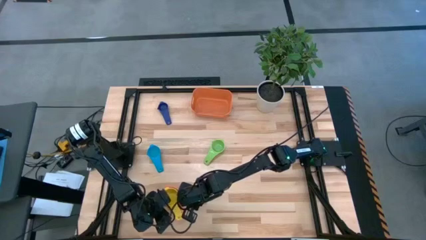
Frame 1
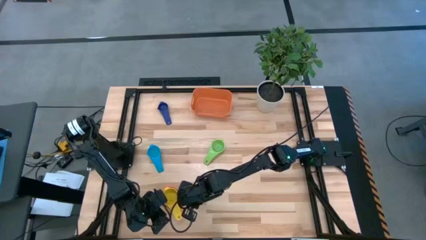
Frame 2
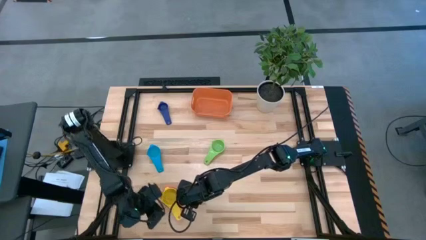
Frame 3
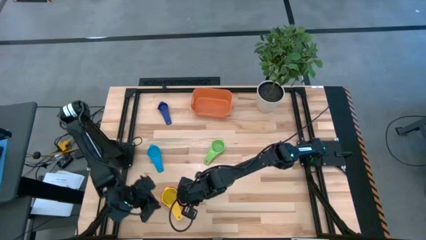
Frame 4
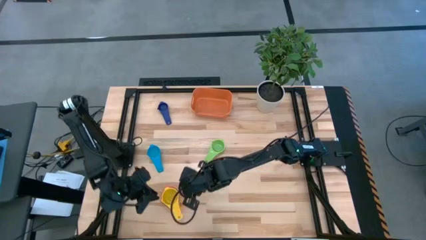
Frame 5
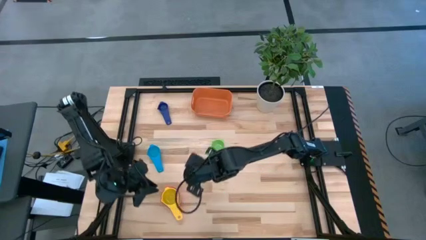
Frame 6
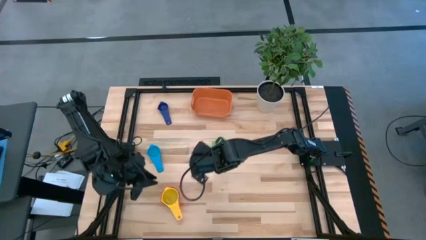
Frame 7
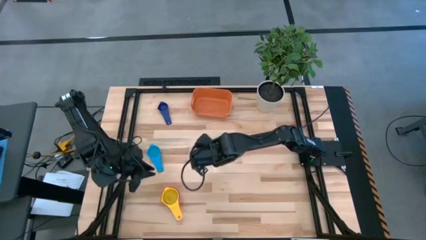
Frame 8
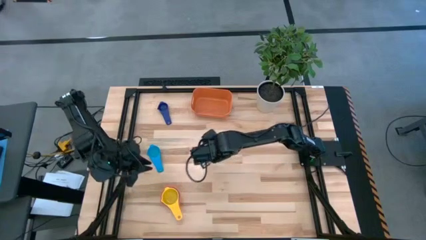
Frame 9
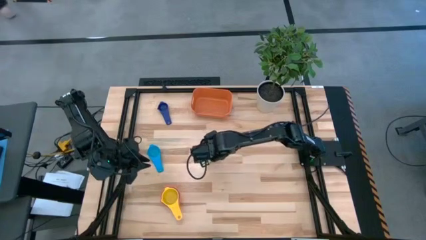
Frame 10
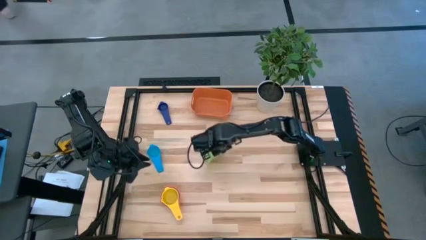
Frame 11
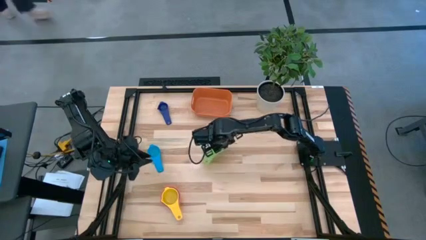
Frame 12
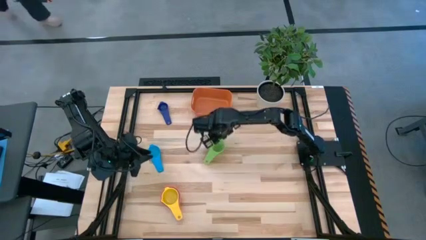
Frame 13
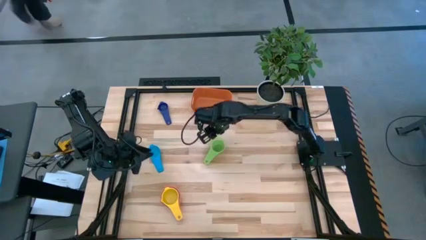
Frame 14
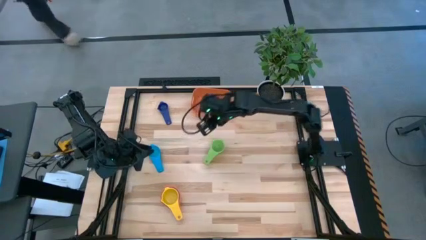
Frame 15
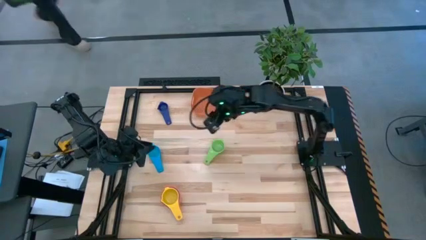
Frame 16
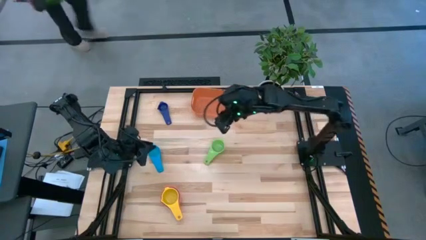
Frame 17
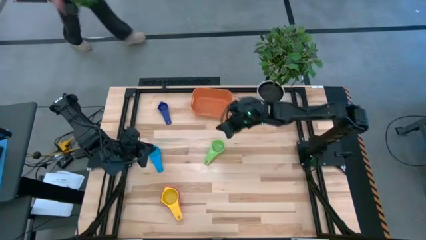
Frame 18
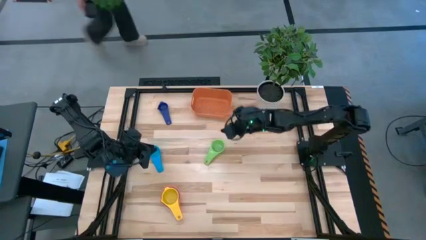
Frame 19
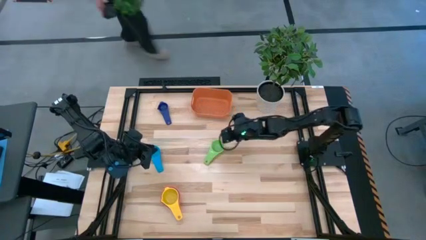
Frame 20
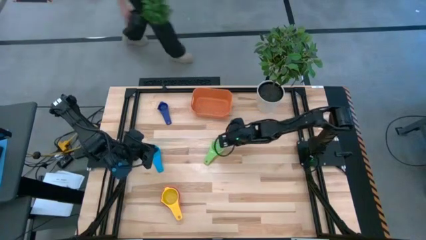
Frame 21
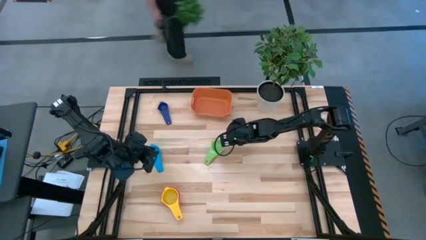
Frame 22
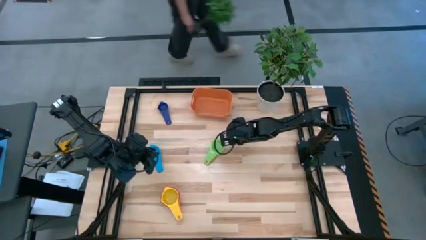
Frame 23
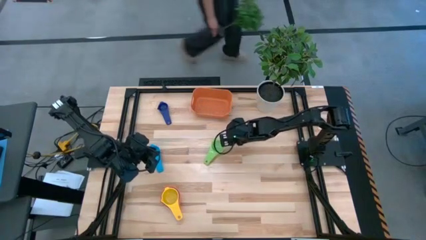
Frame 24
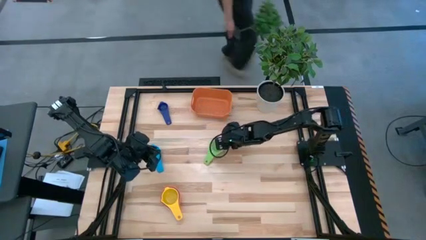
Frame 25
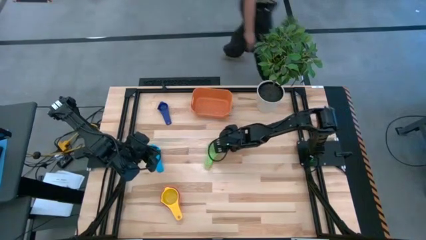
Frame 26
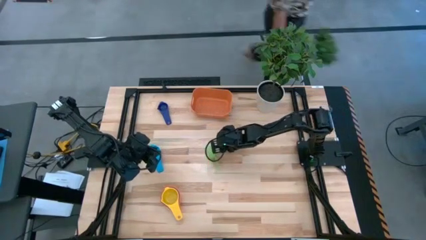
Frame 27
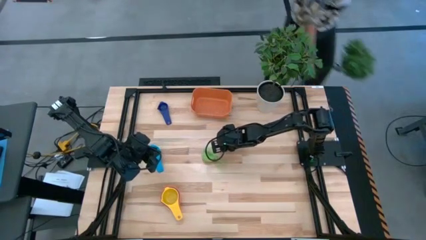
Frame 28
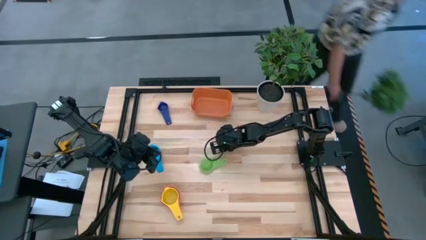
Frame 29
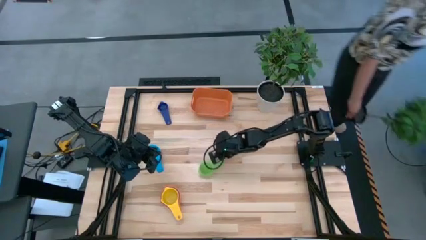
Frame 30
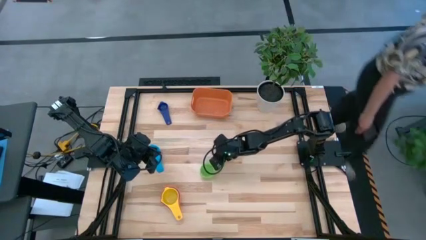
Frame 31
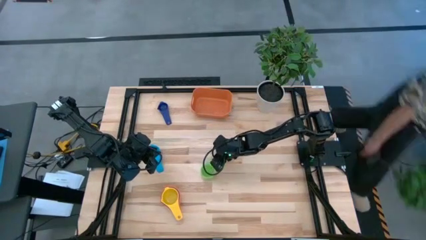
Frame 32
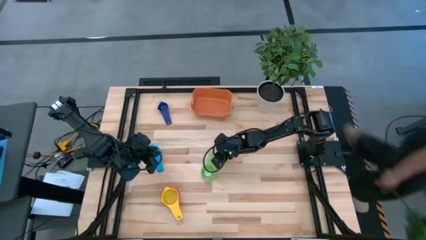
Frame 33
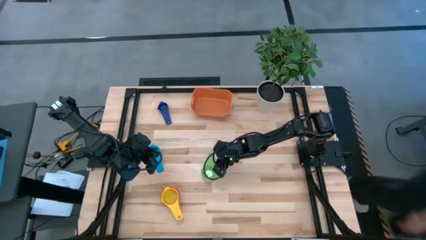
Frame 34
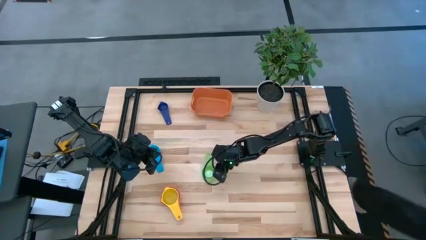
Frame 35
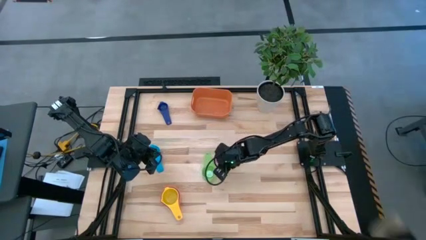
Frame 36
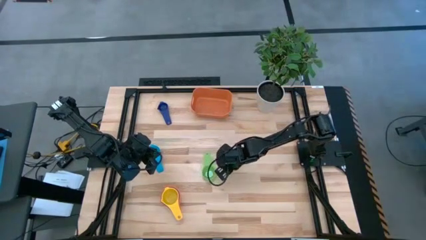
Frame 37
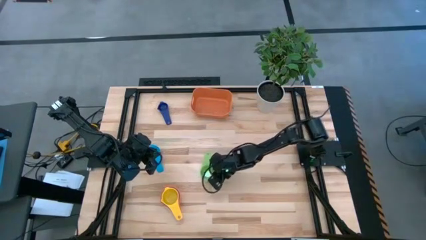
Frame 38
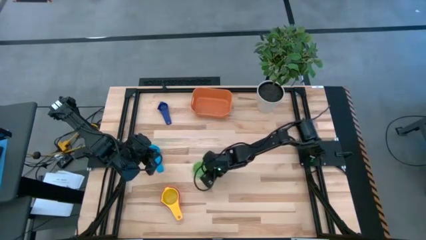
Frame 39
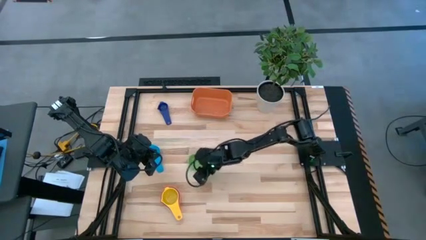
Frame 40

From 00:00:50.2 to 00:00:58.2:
Task: Nest measuring cups in basket
Stack the green measuring cup on top of the yellow measuring cup

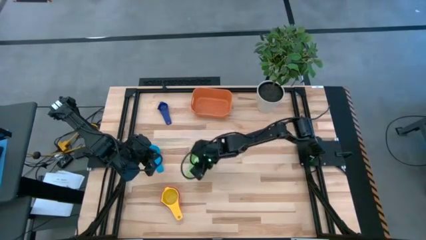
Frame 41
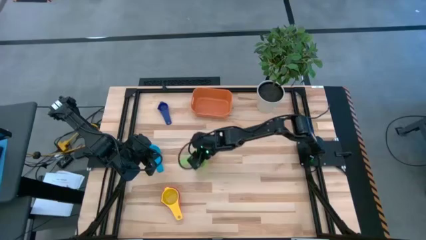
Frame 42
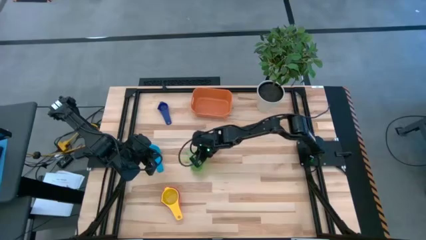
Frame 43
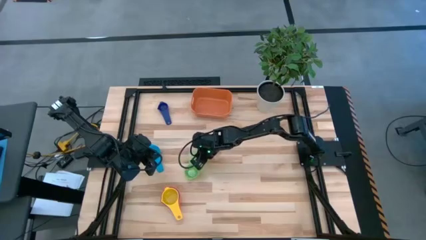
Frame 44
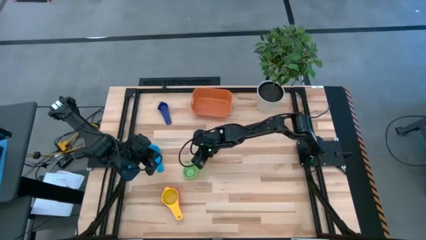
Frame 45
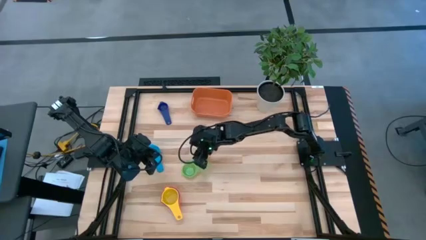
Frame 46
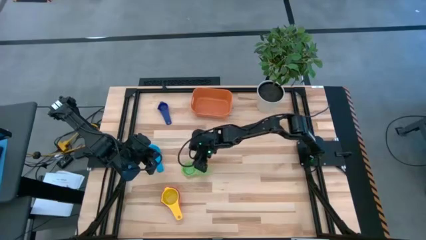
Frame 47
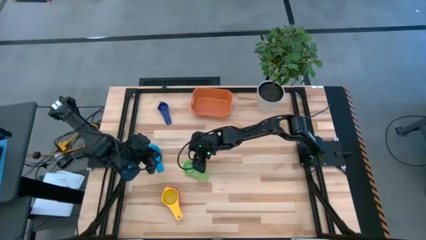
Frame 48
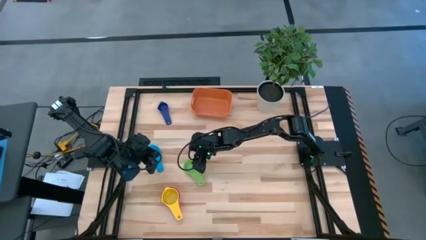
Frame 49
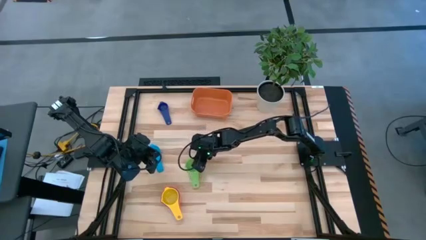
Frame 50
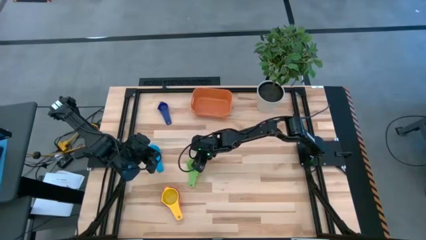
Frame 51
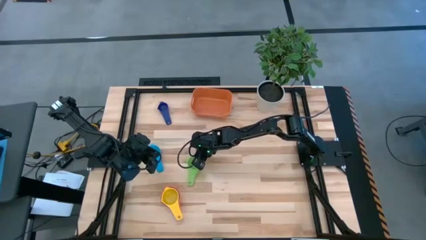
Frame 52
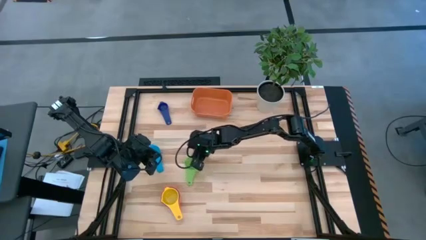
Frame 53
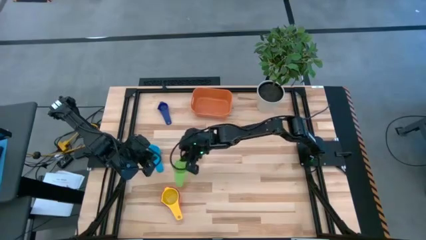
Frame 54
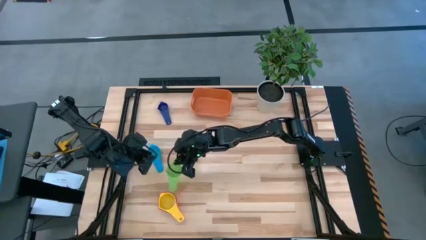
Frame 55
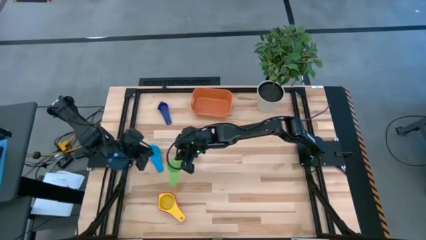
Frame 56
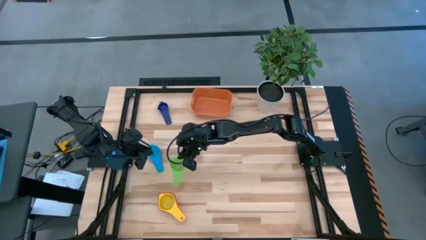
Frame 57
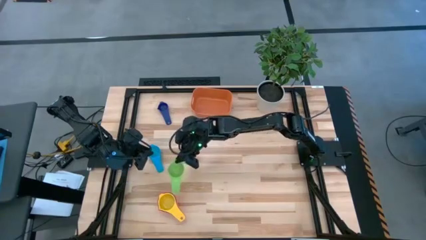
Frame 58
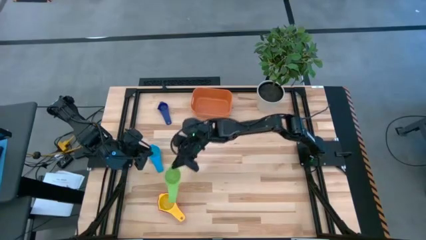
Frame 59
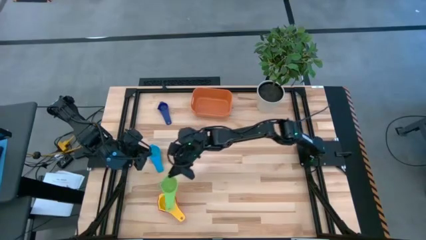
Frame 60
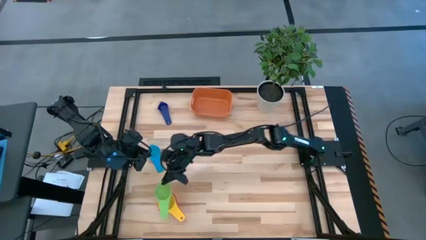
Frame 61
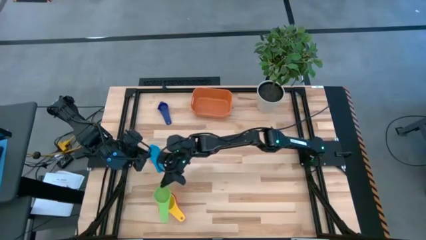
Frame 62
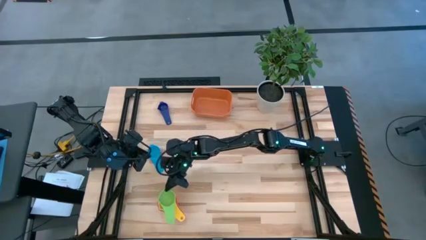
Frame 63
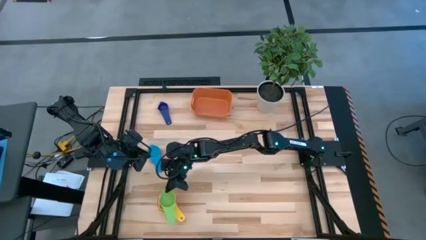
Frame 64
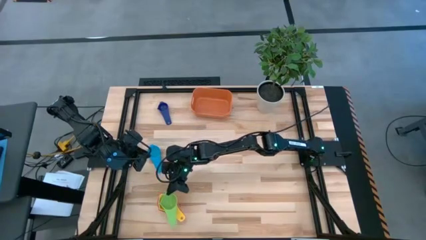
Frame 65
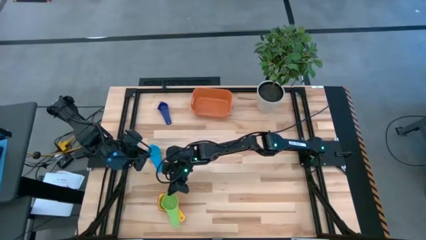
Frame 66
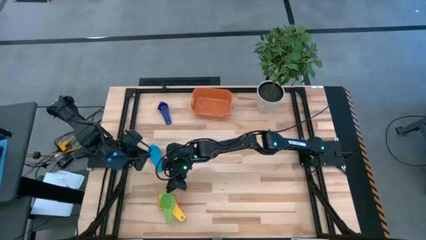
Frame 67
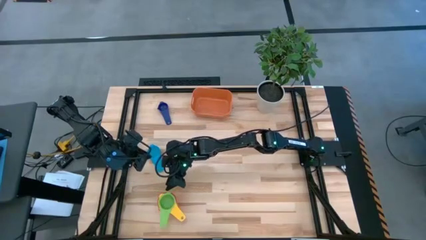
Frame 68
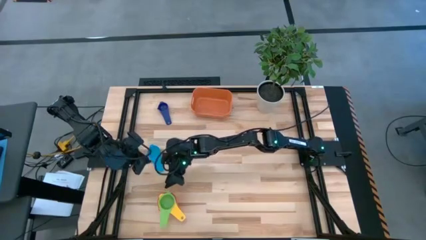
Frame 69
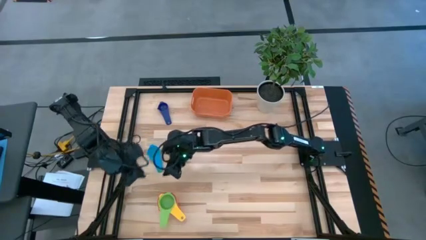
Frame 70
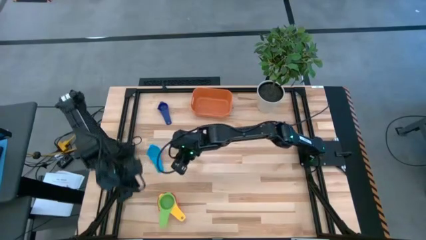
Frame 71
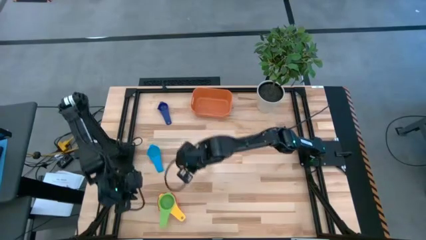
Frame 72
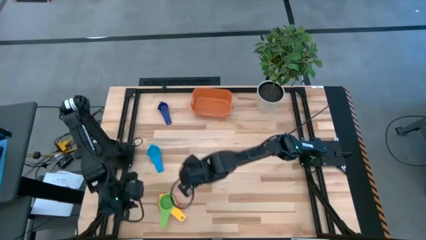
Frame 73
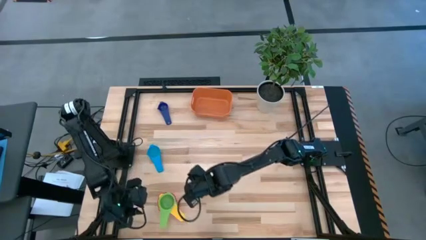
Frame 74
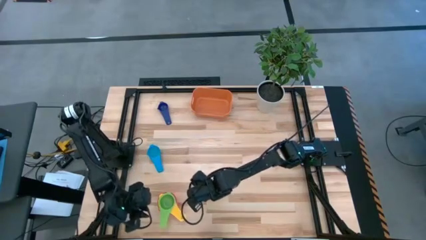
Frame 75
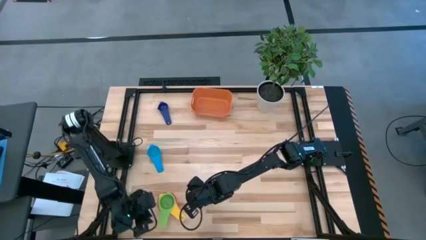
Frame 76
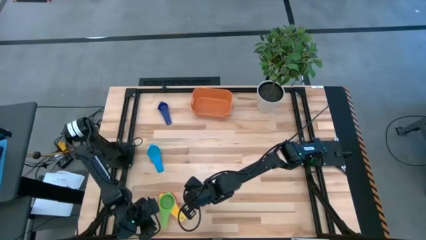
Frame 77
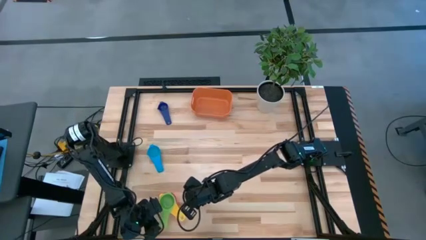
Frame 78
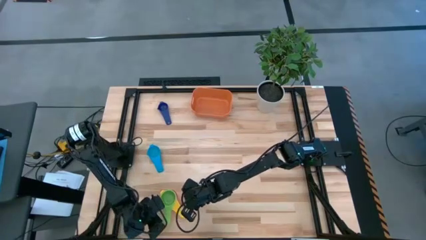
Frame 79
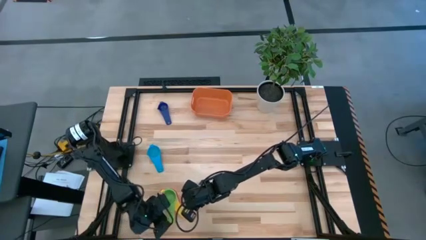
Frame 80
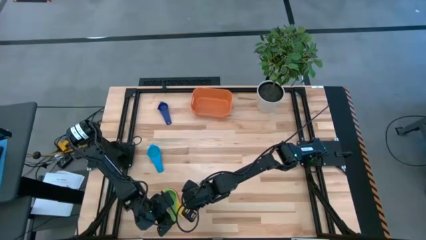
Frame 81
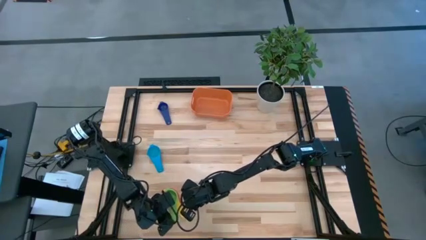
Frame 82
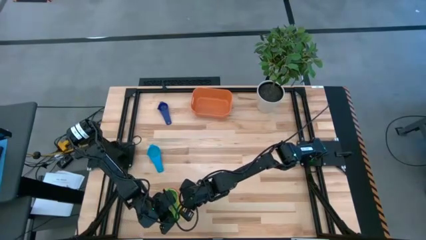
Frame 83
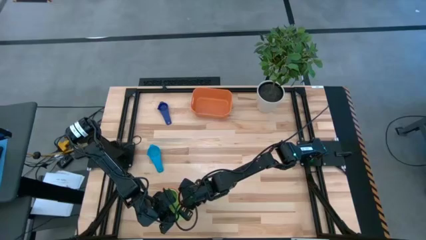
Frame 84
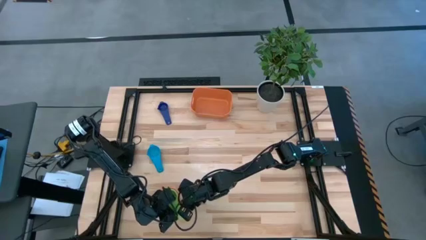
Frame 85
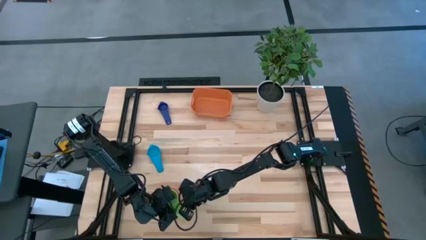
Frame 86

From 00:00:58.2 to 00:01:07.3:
Stack the green measuring cup on top of the yellow measuring cup
